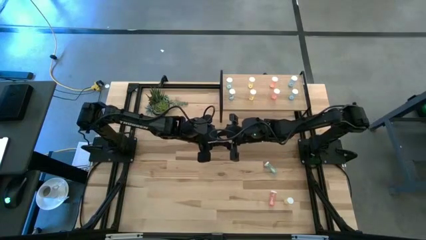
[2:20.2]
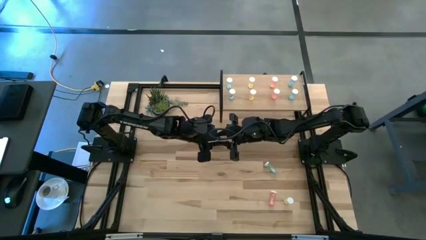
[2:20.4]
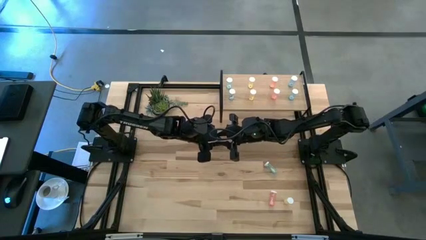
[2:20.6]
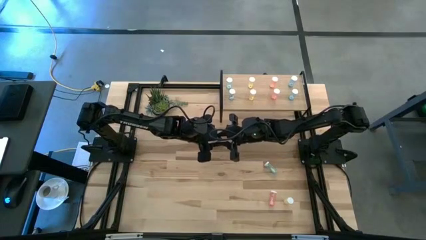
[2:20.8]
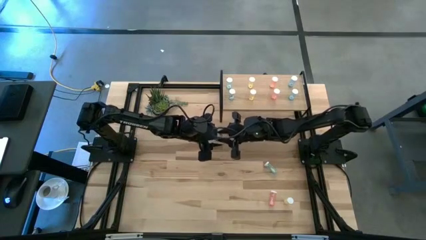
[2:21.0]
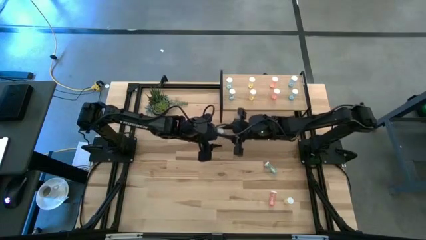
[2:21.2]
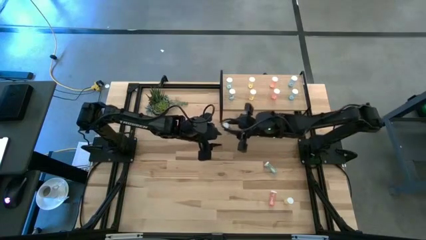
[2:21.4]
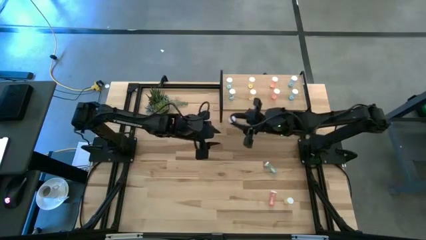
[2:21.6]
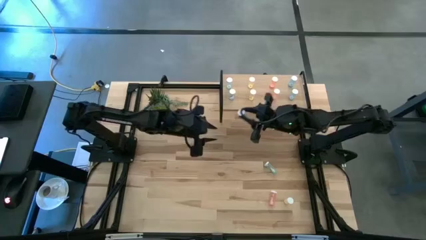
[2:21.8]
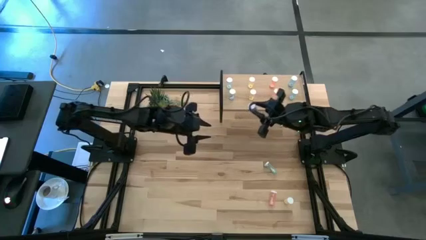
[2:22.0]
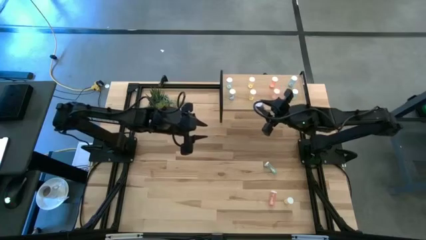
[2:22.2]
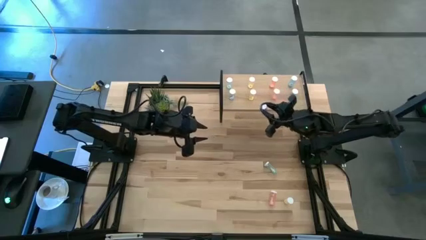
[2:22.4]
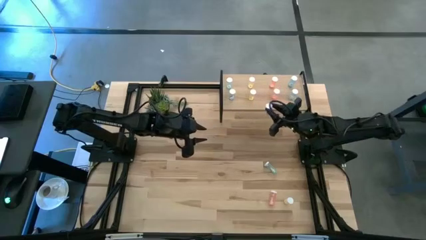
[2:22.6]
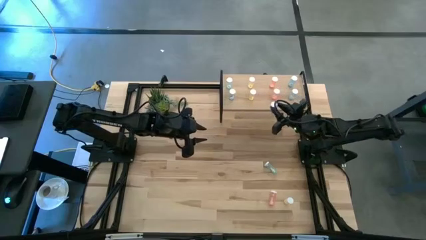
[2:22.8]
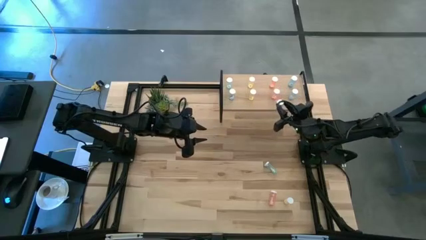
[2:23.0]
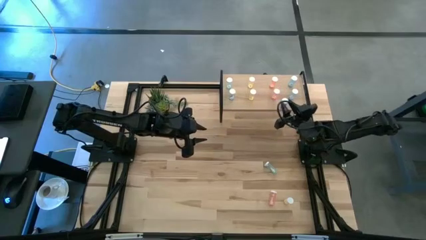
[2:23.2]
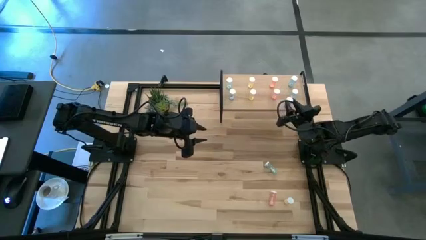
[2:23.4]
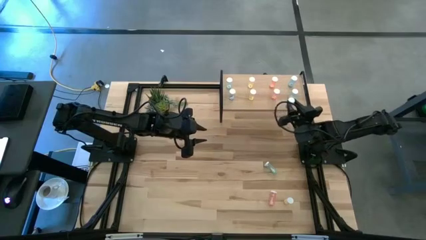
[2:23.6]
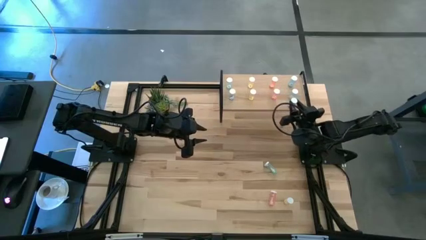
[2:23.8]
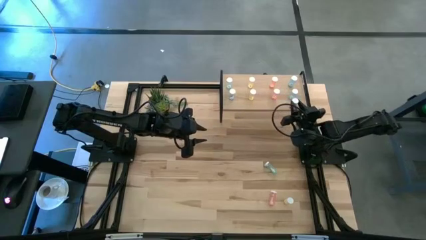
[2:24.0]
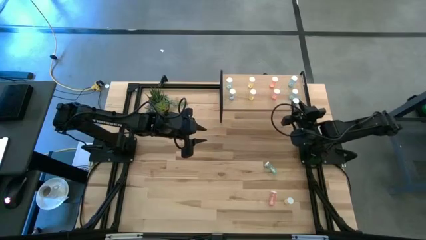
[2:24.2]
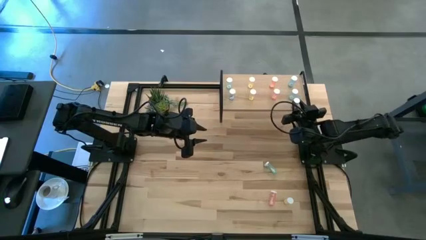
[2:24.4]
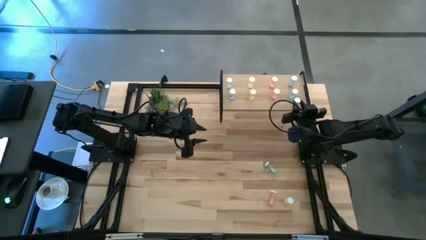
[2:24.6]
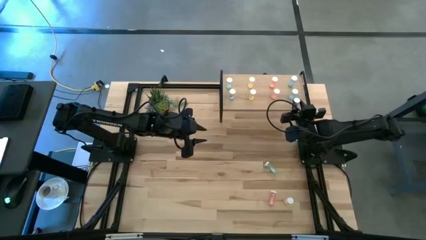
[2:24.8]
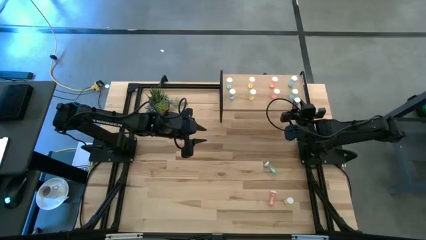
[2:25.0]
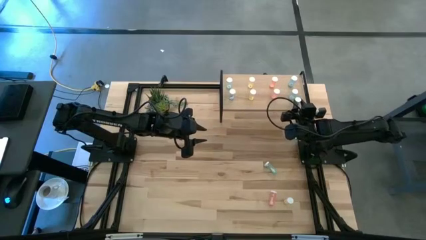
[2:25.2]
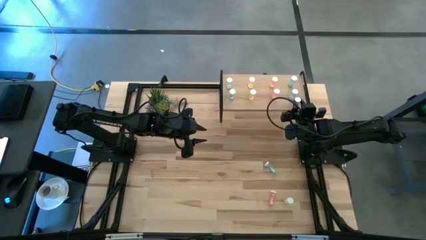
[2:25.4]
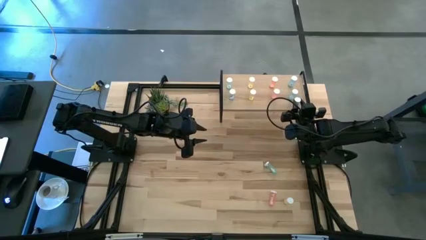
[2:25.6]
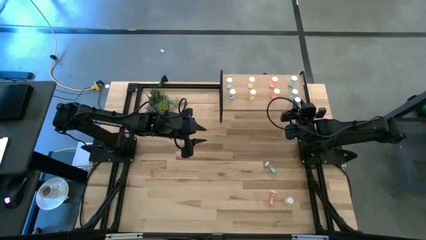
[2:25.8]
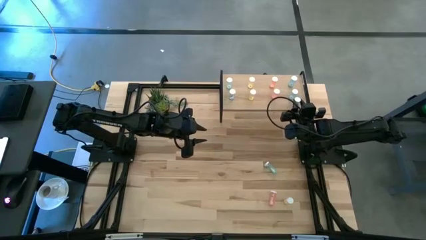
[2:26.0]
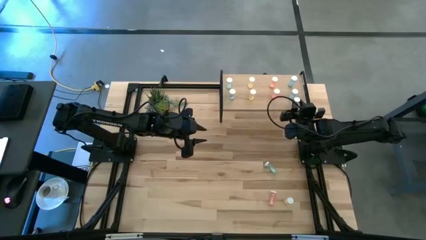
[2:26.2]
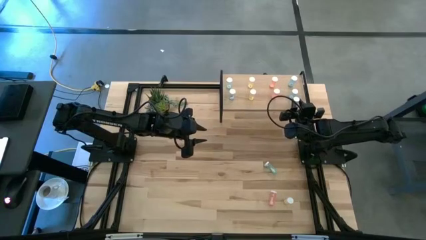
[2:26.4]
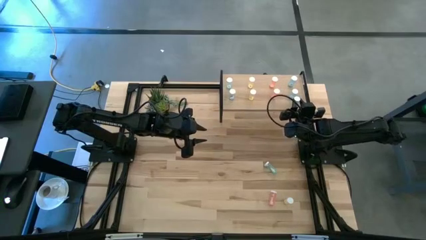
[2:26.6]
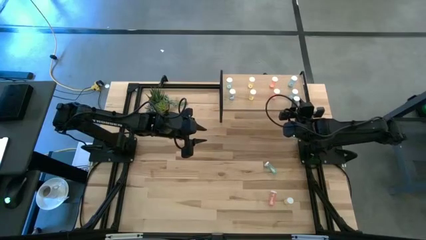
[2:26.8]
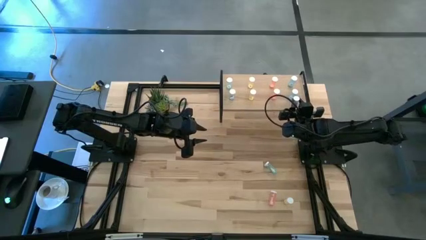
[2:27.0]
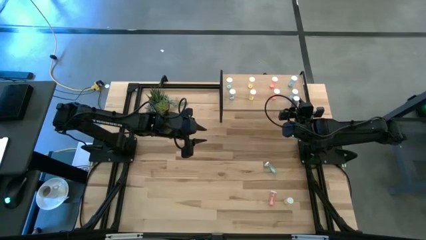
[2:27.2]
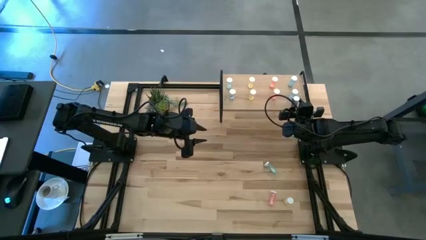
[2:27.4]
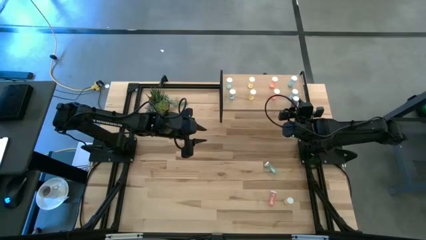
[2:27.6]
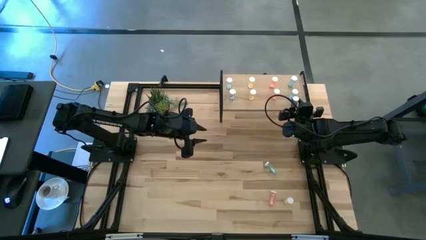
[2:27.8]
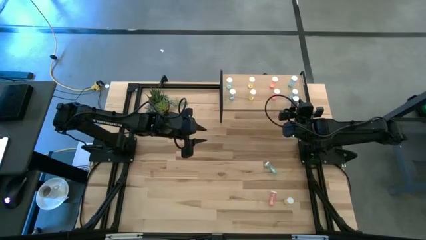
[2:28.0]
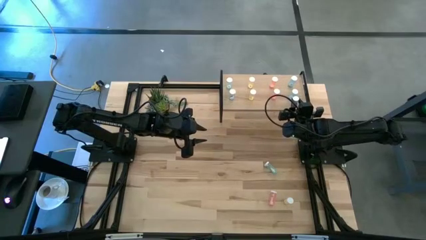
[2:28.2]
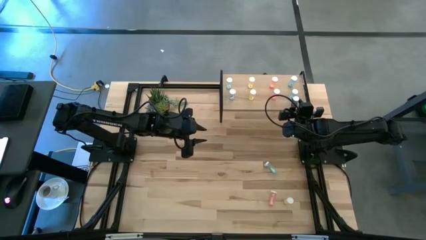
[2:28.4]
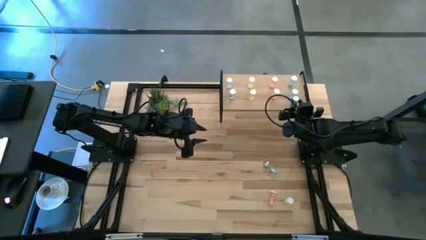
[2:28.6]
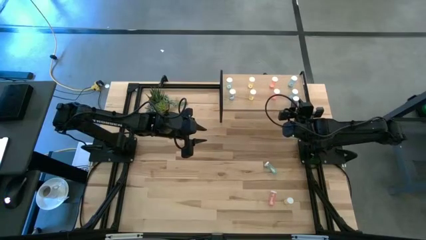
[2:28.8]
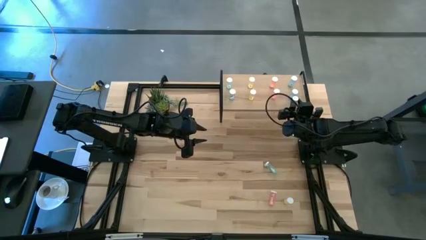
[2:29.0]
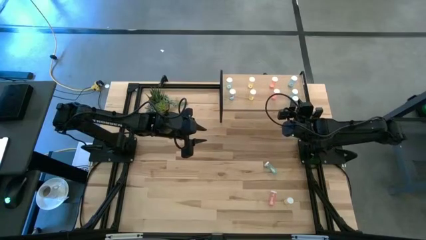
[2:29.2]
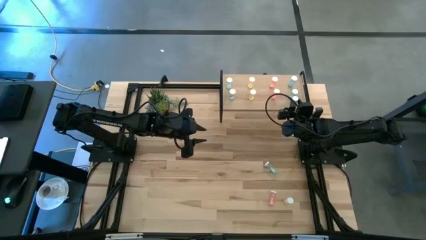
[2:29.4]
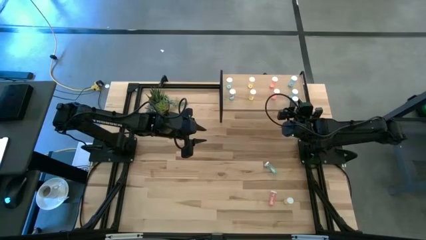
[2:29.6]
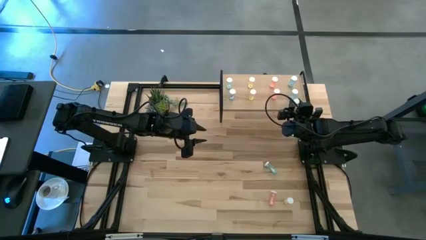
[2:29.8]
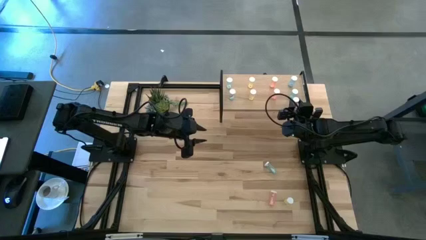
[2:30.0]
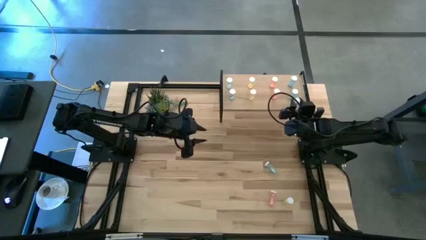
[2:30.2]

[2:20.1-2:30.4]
Task: Pick and place medicine bottles onto shelf by color
Put the blue pill bottle aligned with the other blue pill bottles on the shelf
